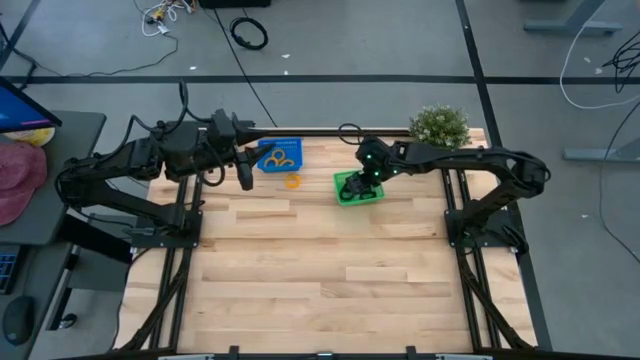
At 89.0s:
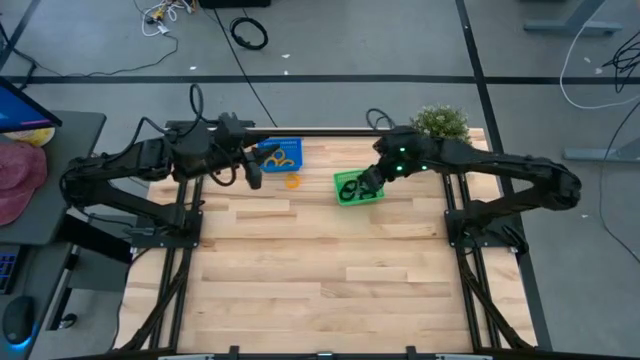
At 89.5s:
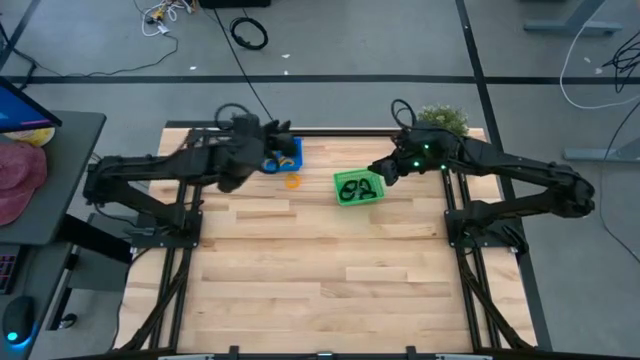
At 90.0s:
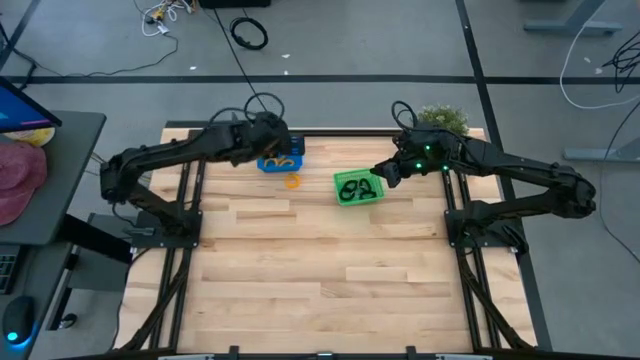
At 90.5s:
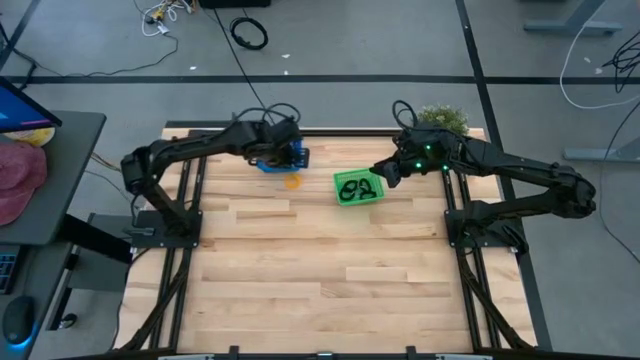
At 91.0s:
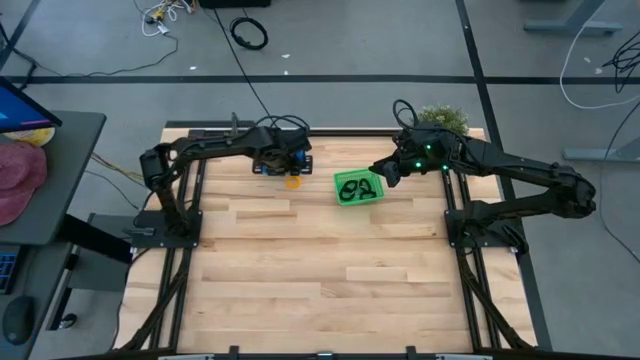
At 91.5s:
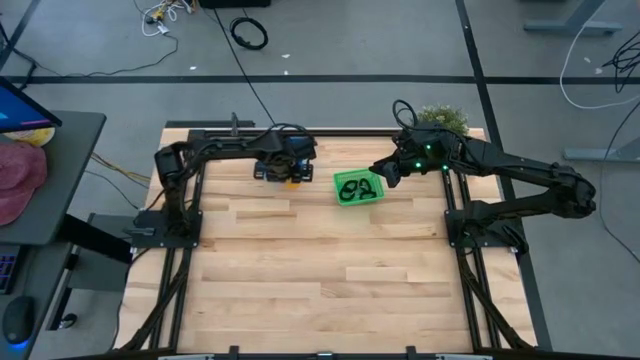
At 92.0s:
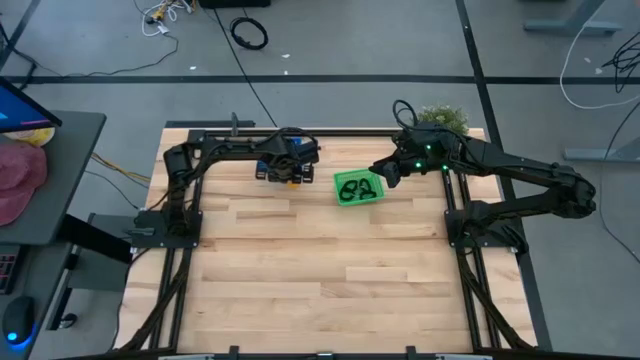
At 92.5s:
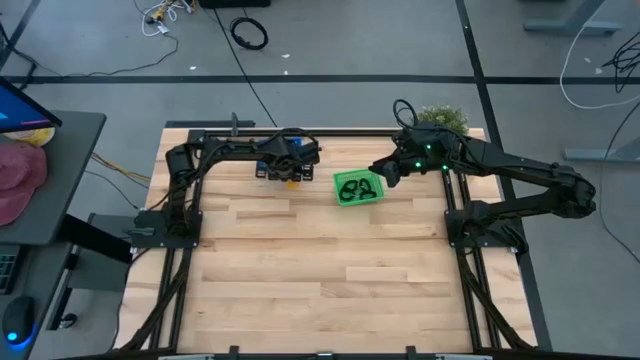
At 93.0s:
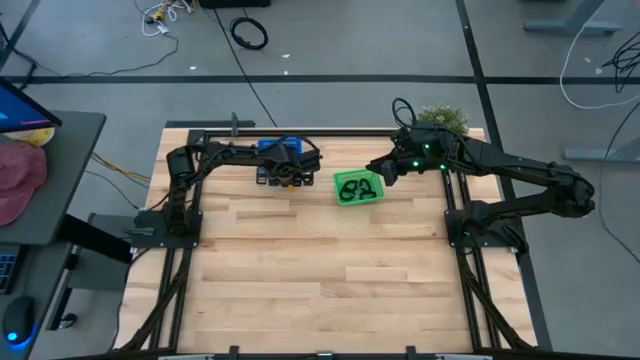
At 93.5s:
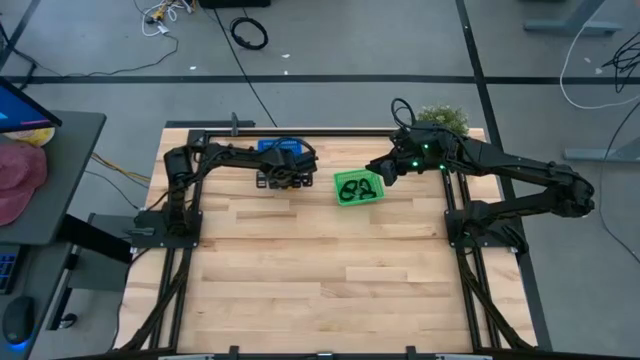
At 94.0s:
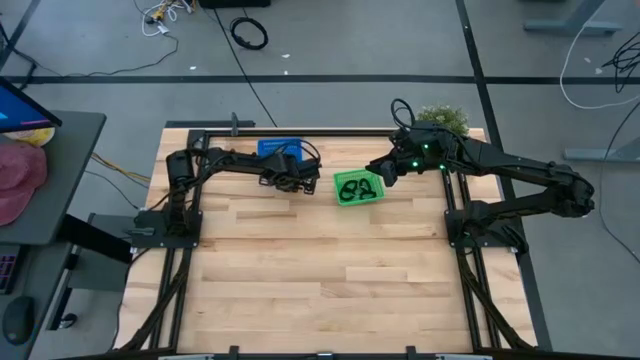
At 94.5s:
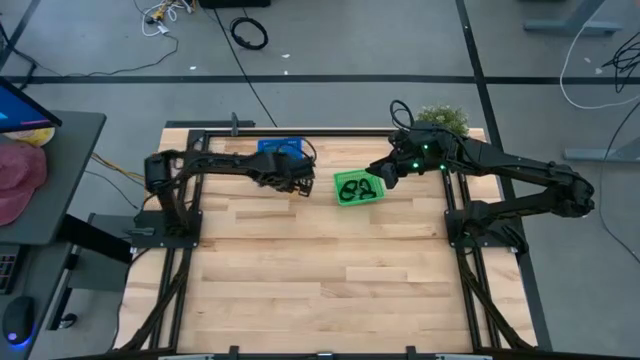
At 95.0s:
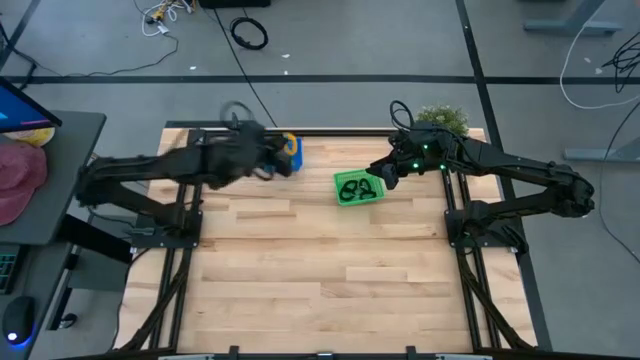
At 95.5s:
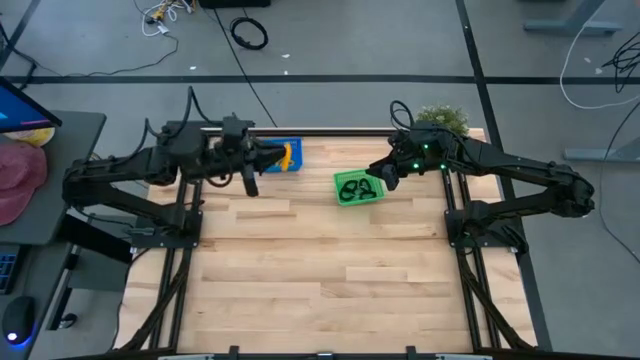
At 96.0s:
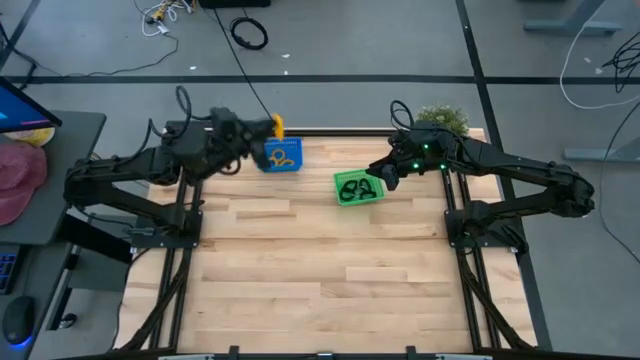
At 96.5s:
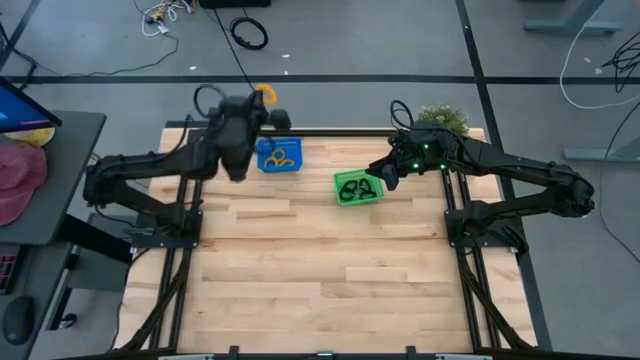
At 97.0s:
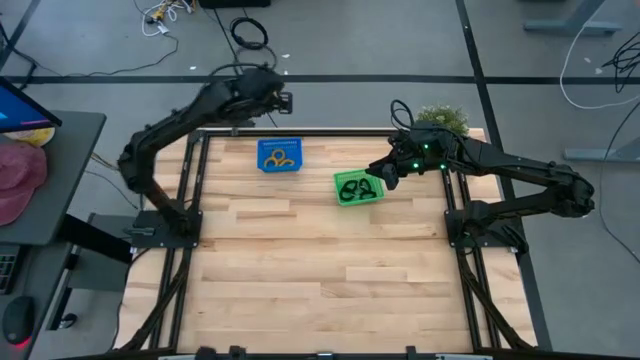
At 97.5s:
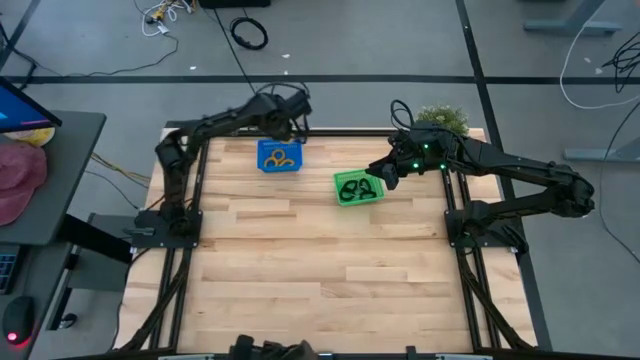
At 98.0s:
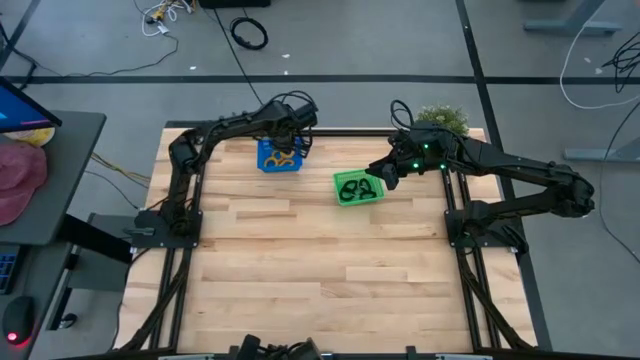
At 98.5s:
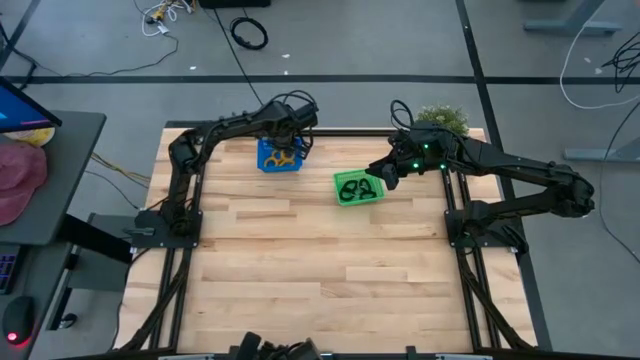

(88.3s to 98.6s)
Task: Sort spring keychains
Put the yellow spring keychain into the blue bin

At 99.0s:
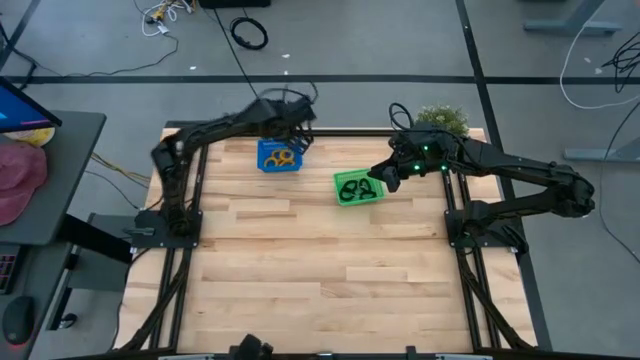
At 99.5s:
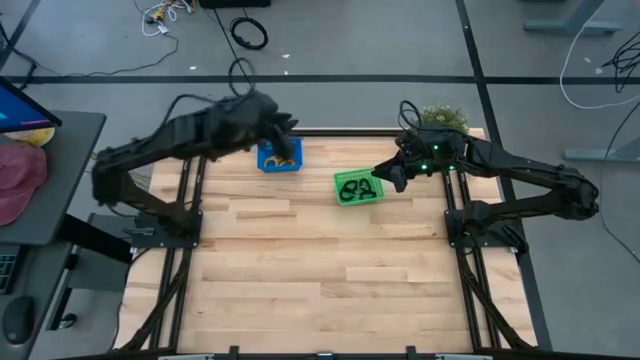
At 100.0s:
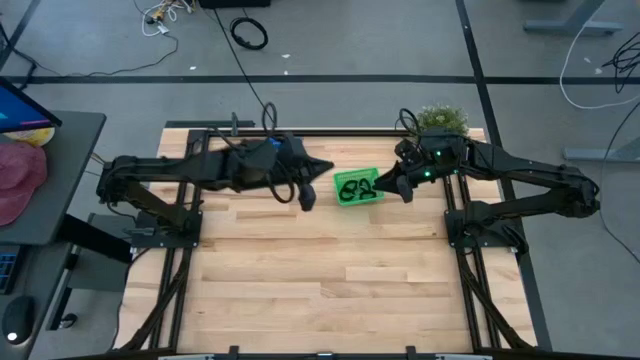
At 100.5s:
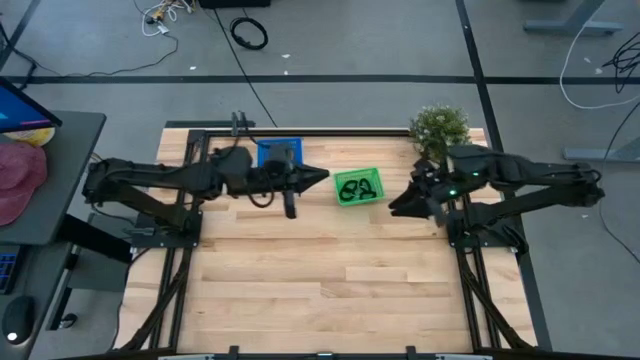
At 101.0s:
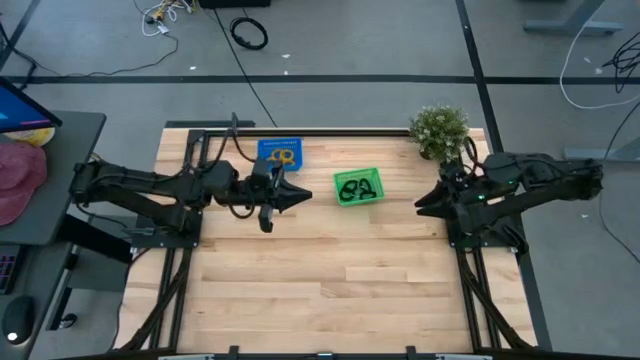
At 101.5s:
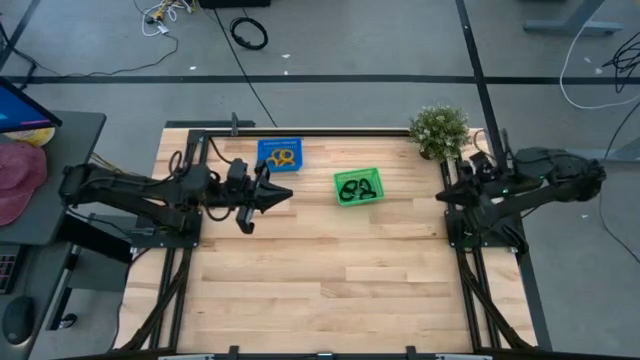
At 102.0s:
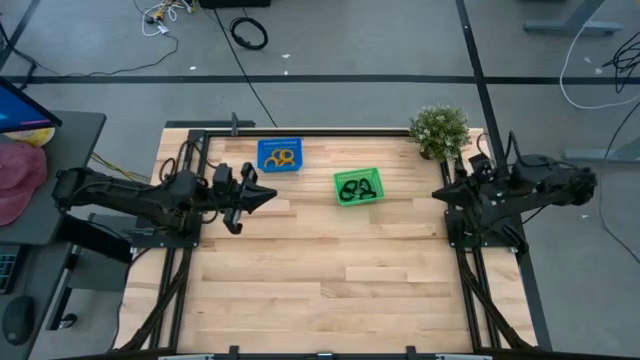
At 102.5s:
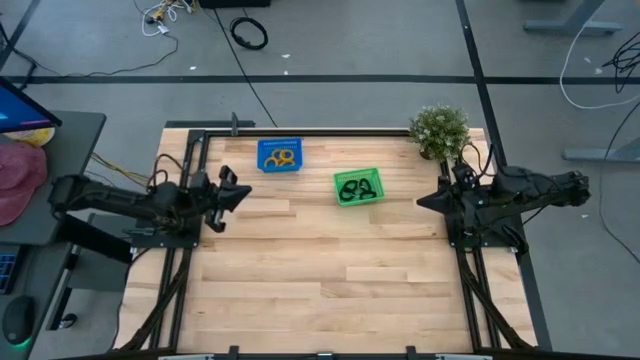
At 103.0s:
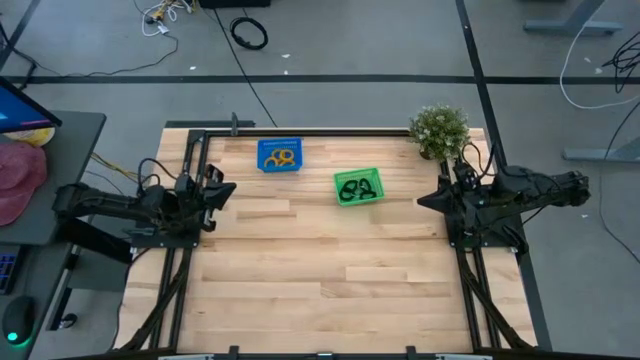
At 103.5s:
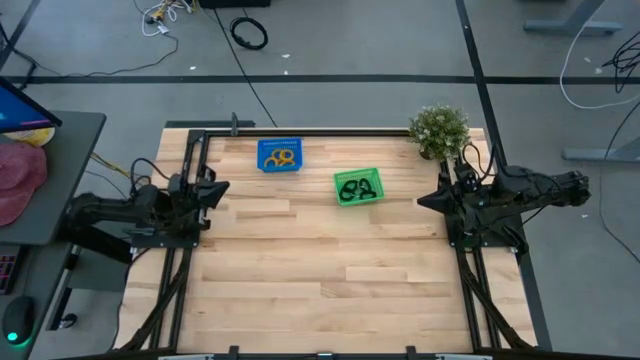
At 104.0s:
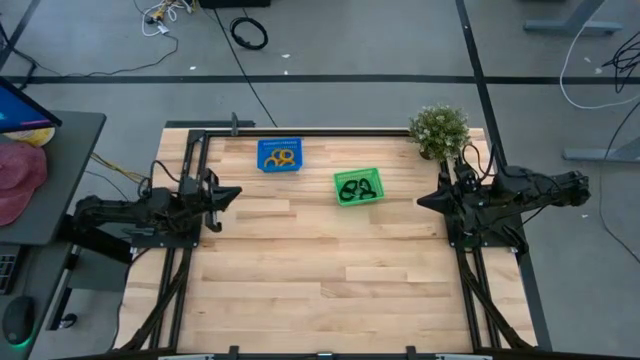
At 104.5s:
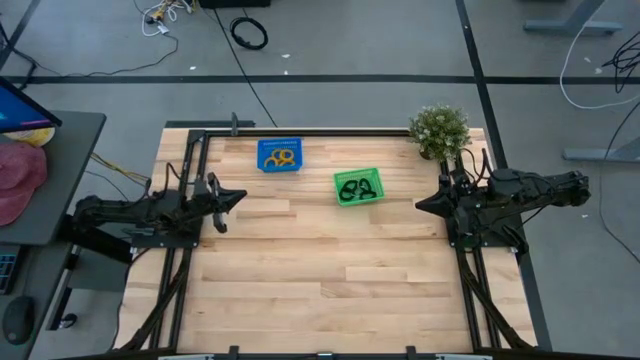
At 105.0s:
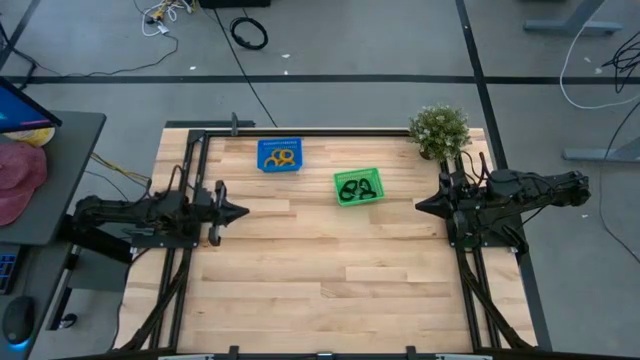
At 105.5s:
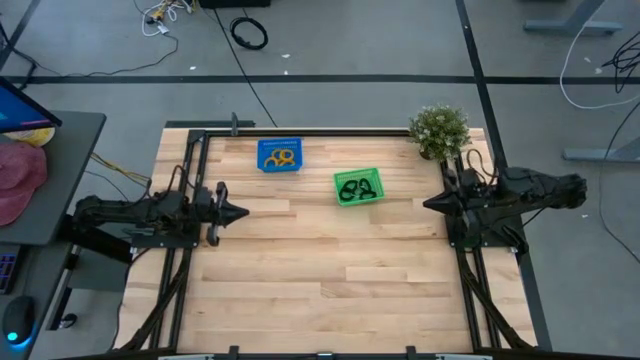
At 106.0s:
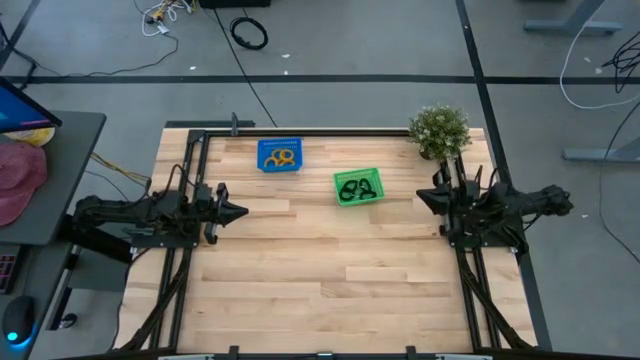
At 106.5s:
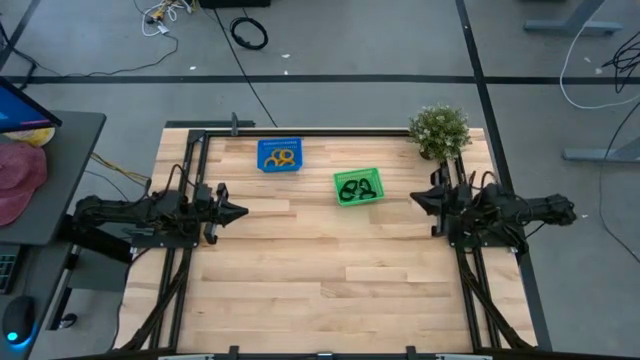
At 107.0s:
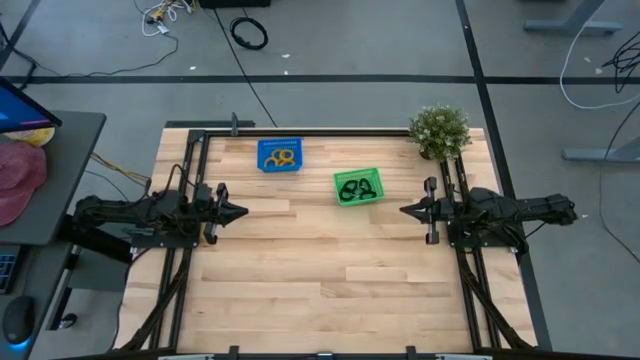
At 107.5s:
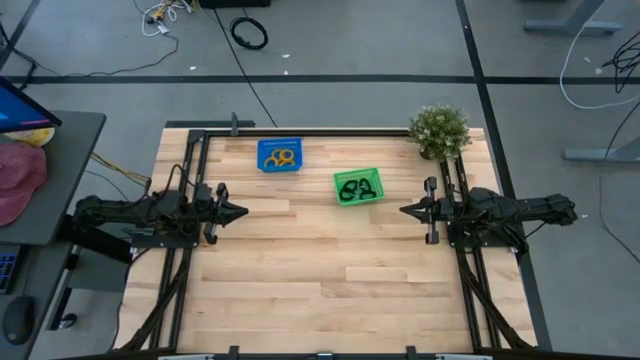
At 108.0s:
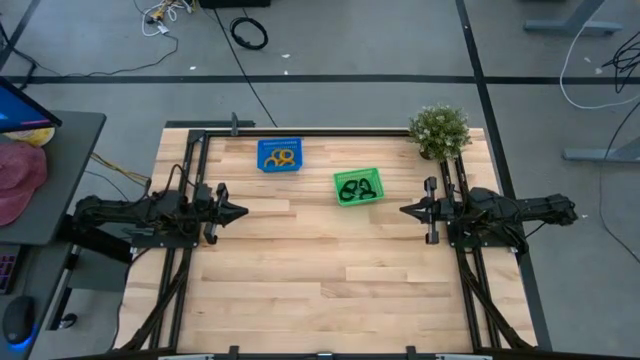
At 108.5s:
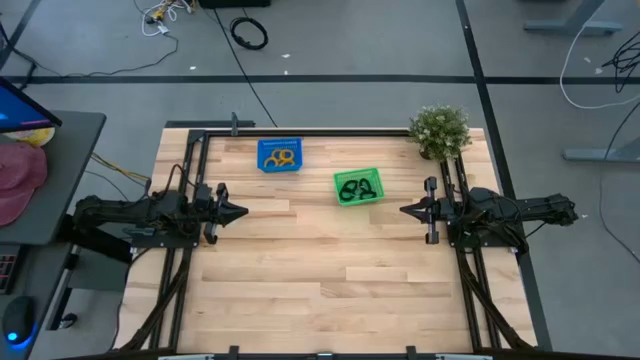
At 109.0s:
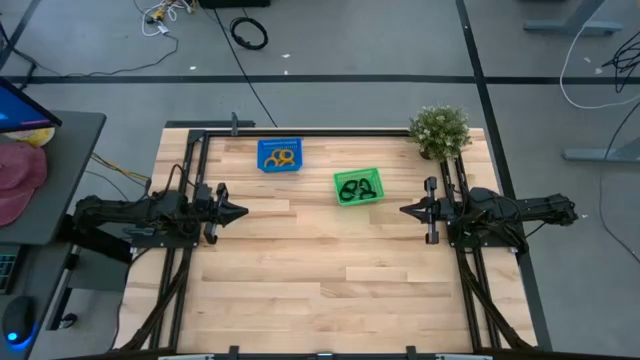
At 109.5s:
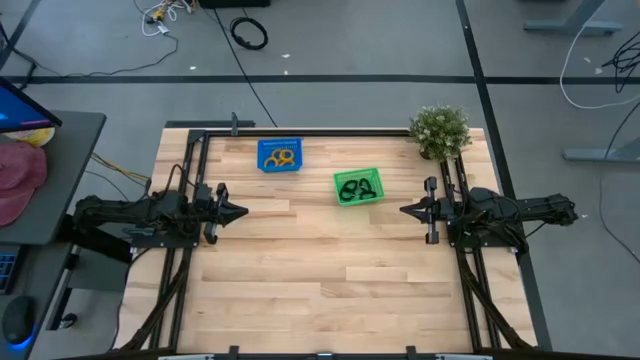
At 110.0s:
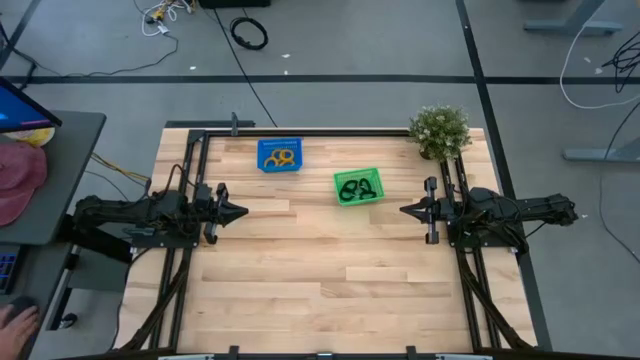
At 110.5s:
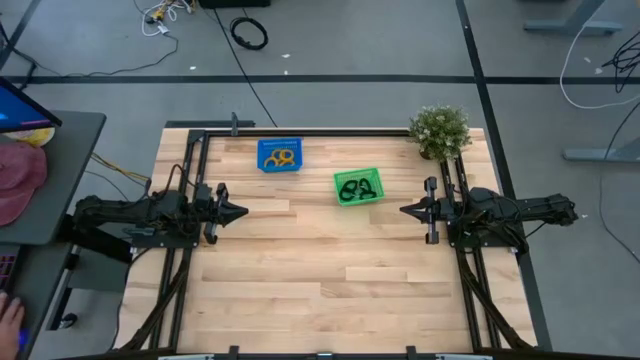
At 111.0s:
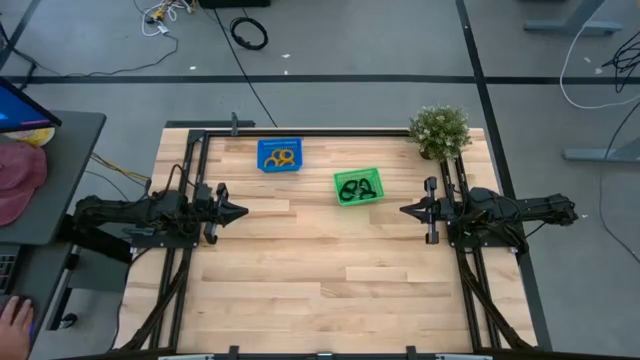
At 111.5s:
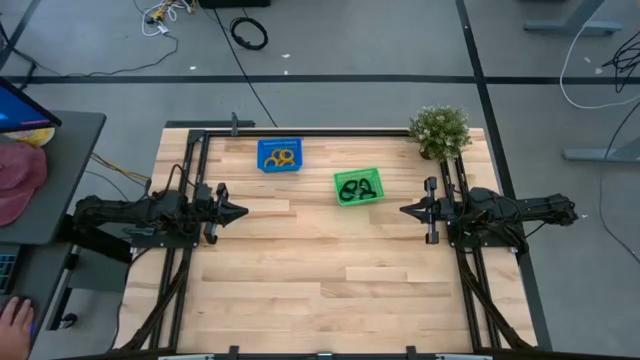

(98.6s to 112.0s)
Return to Home Position
